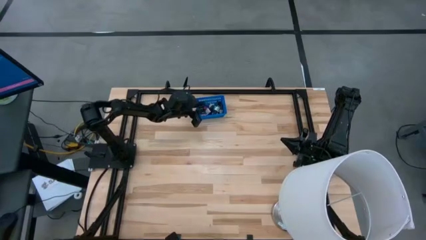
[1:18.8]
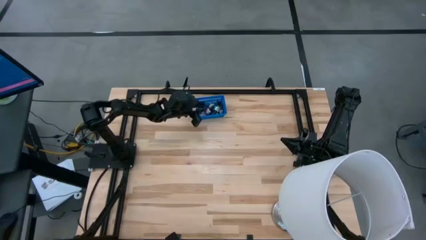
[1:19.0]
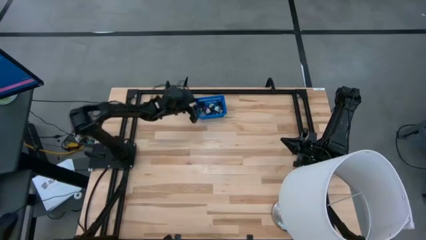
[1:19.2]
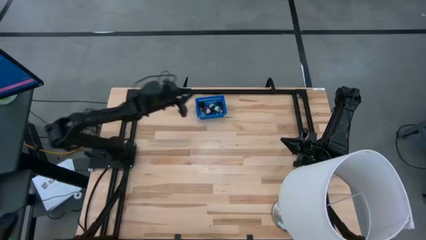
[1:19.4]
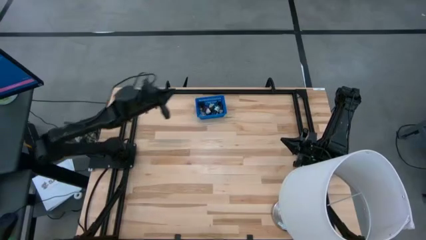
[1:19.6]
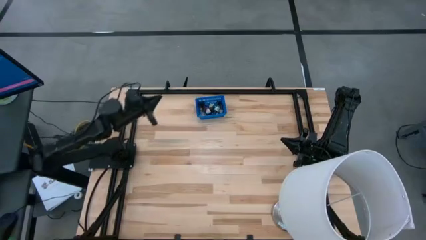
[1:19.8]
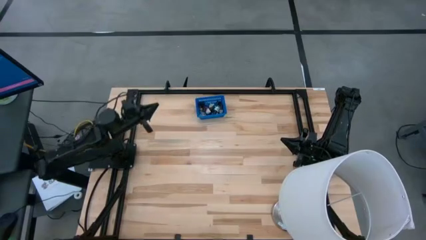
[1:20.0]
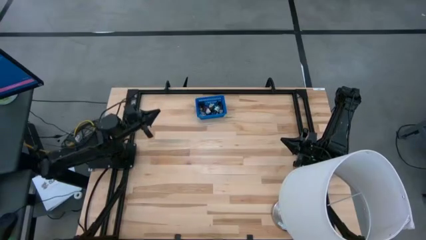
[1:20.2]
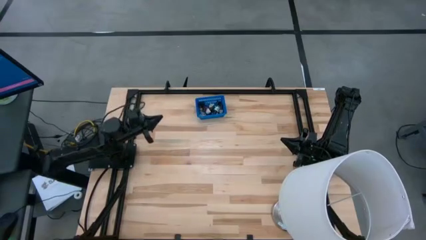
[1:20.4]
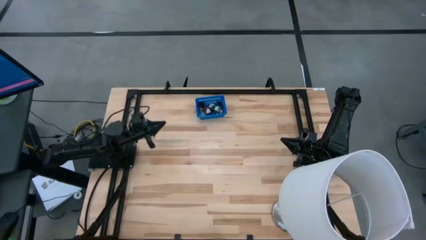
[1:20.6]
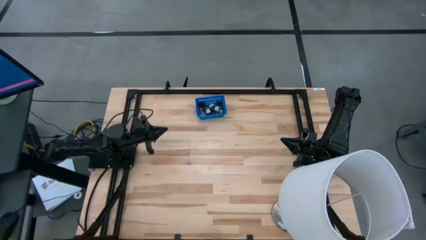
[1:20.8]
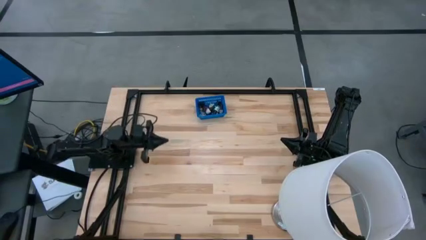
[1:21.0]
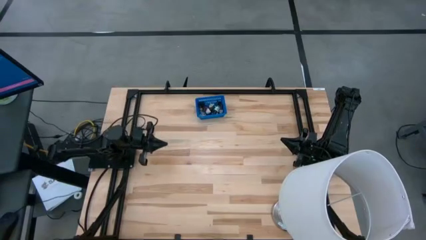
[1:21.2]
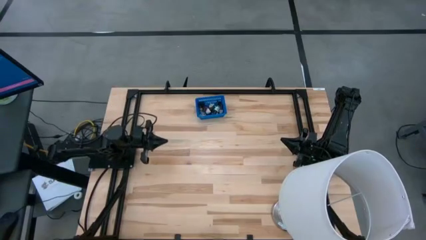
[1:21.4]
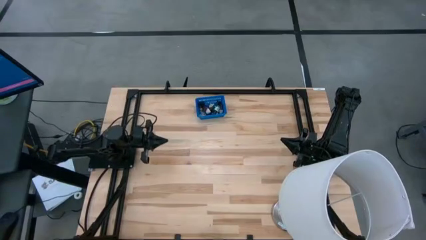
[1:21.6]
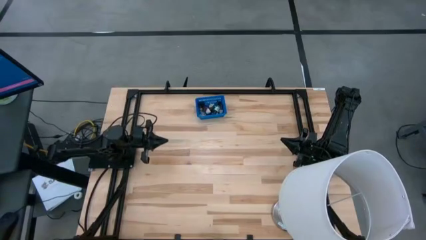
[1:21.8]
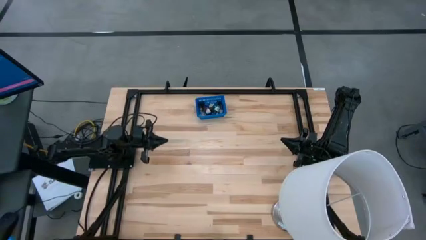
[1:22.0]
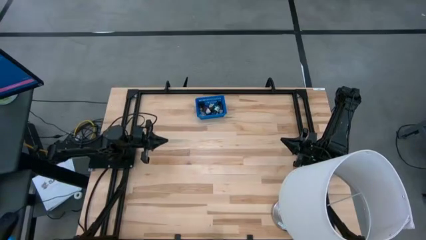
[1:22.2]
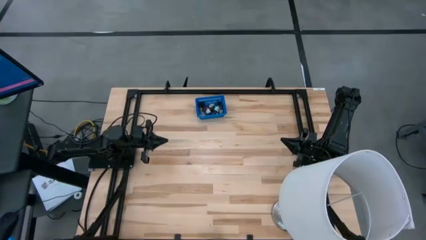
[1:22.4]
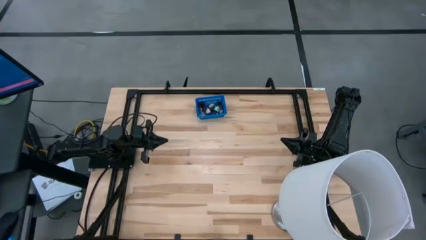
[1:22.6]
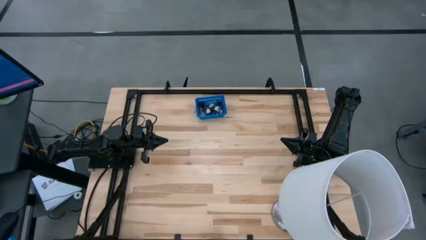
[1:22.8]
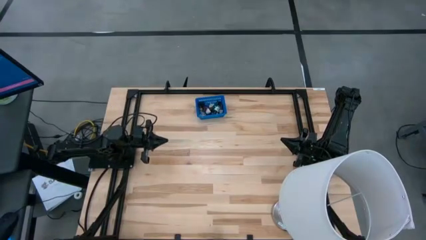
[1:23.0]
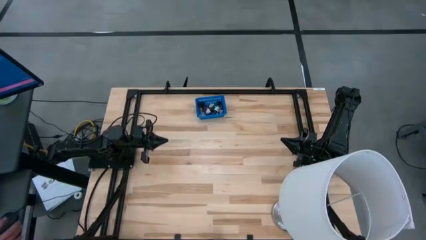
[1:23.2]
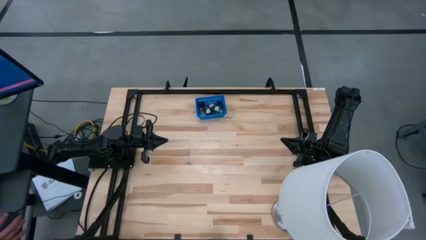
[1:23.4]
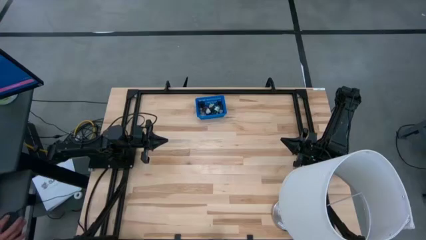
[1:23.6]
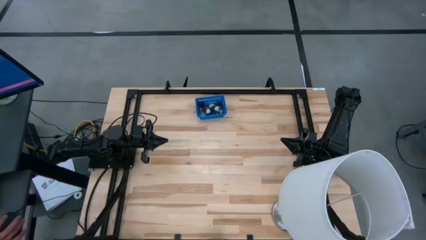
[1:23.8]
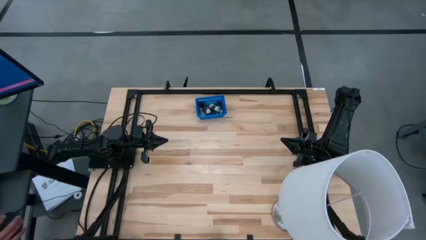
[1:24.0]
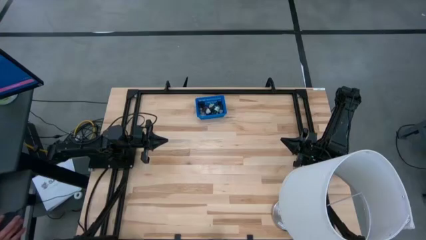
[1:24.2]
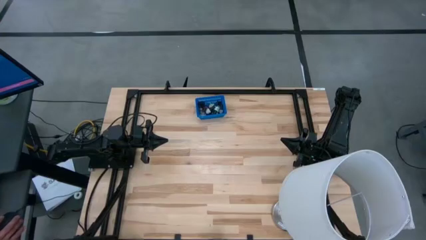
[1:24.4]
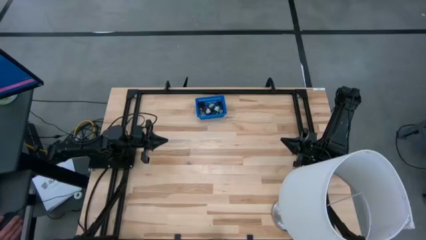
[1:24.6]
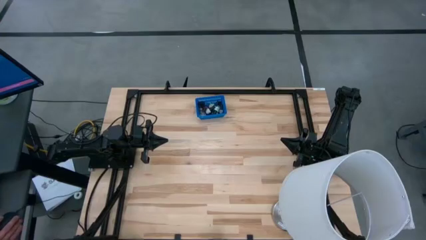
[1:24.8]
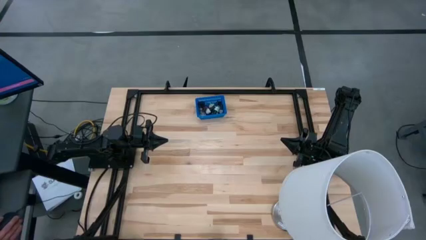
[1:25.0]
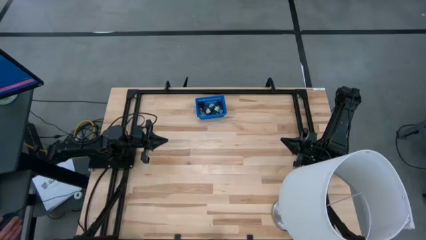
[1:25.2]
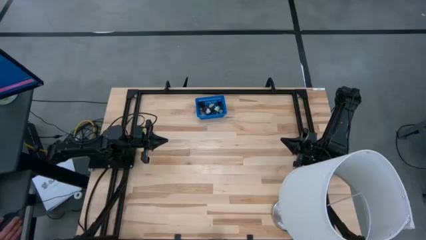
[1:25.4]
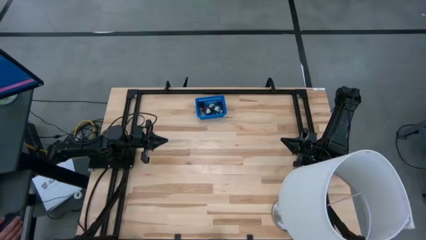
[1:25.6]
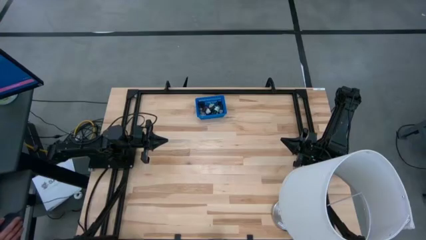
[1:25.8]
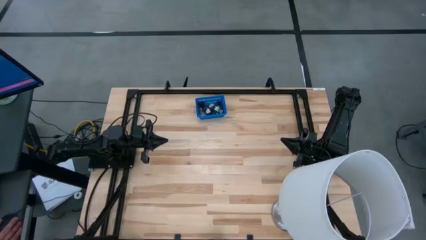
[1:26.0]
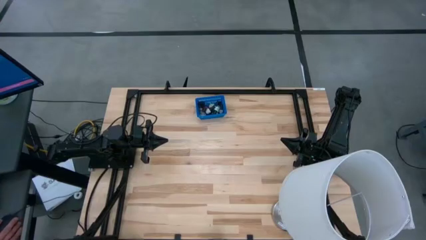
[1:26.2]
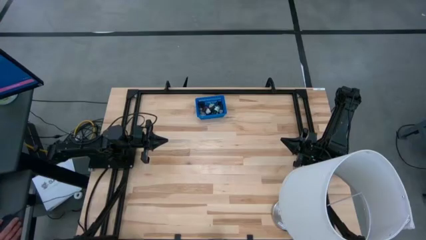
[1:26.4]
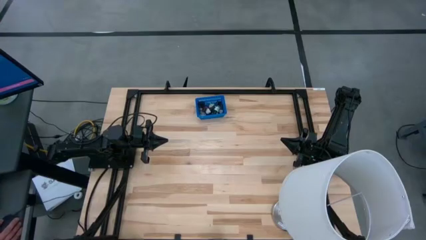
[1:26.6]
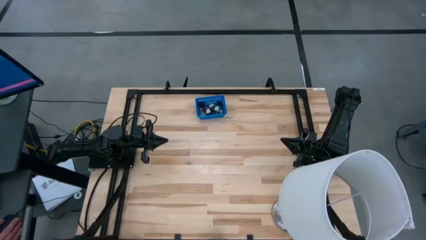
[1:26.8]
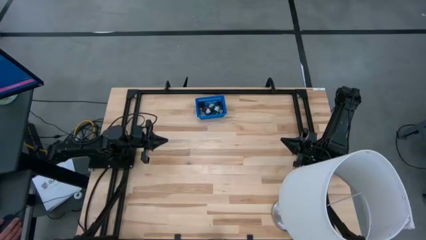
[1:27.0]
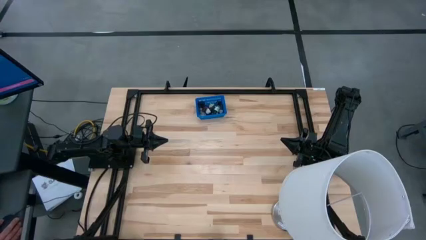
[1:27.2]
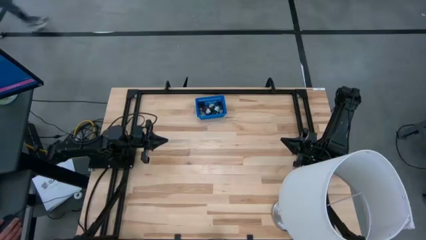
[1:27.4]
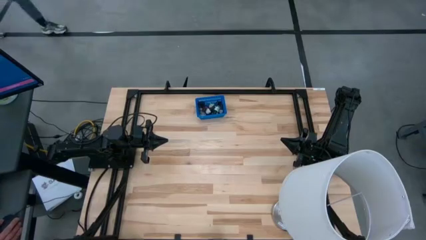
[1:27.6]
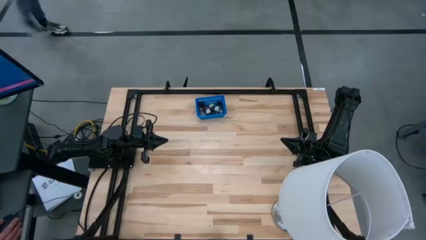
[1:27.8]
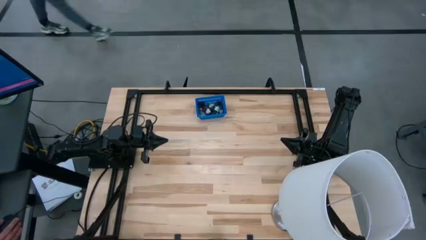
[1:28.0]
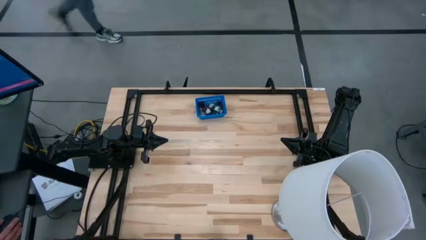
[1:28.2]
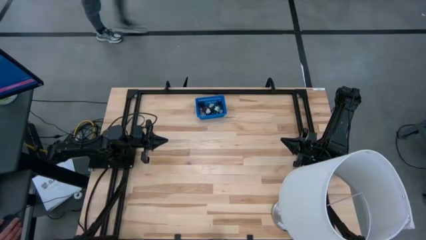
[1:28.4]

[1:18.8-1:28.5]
Task: Pick & Place Nail Polish
Return to Home Position
